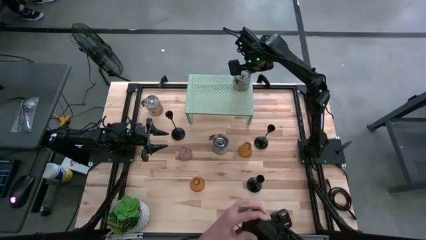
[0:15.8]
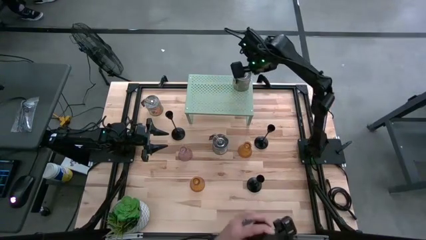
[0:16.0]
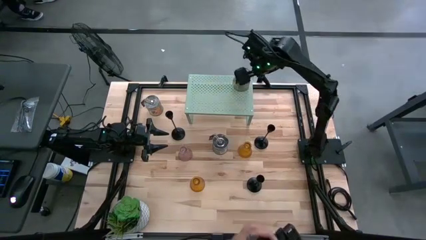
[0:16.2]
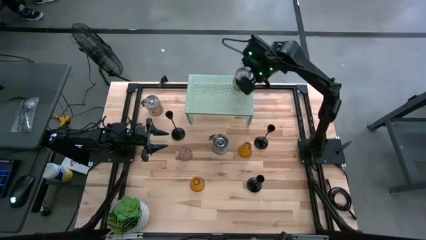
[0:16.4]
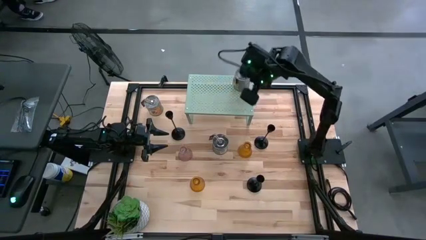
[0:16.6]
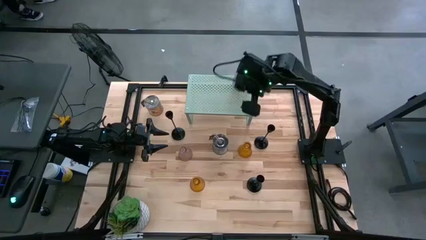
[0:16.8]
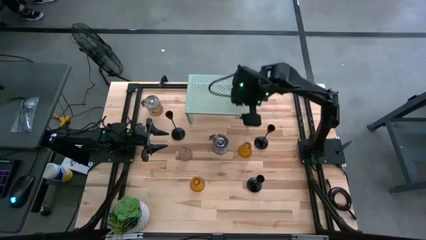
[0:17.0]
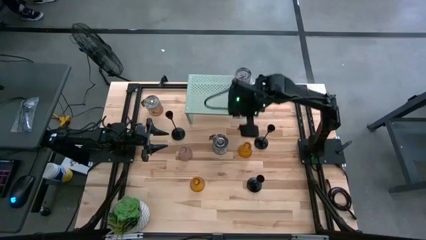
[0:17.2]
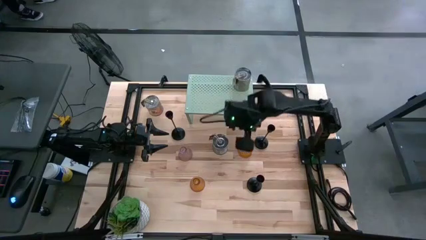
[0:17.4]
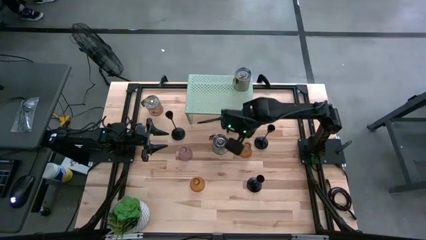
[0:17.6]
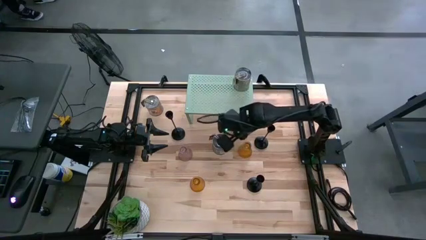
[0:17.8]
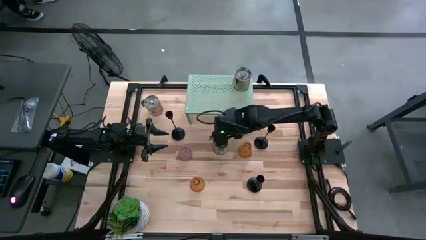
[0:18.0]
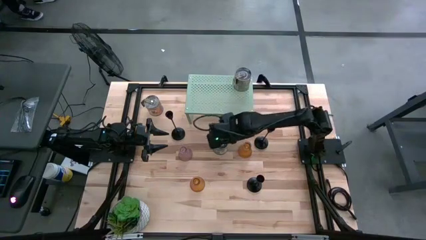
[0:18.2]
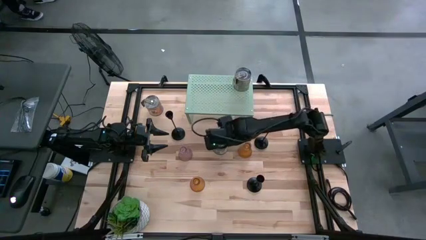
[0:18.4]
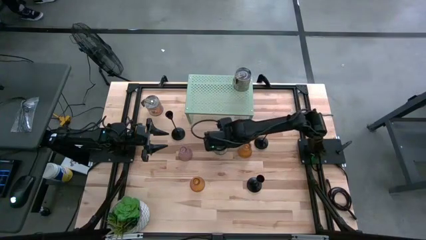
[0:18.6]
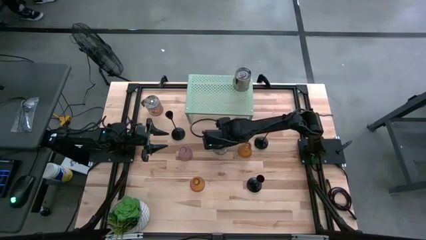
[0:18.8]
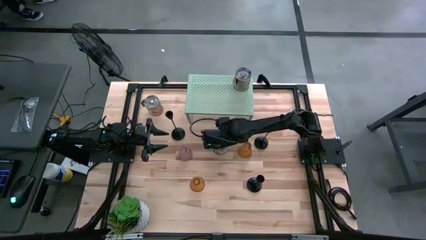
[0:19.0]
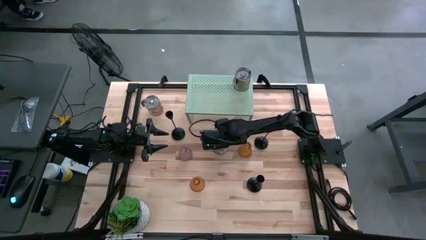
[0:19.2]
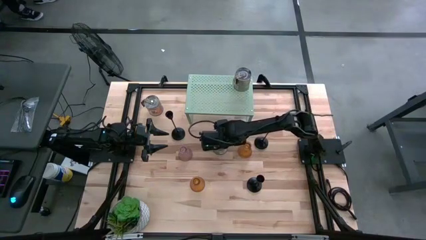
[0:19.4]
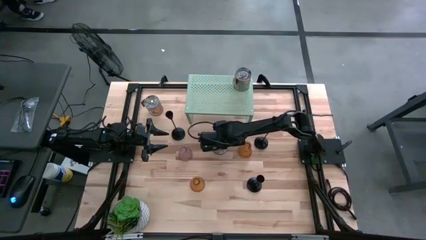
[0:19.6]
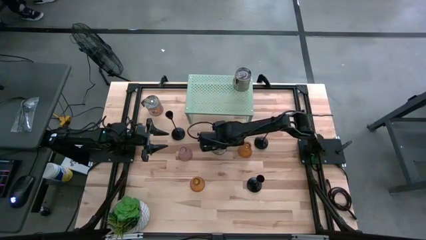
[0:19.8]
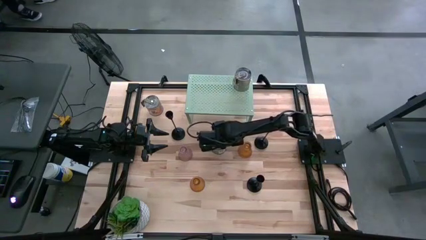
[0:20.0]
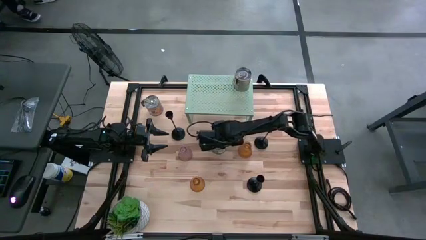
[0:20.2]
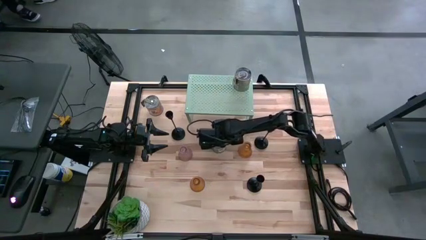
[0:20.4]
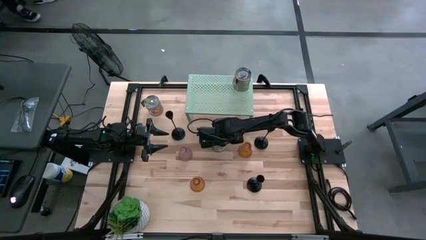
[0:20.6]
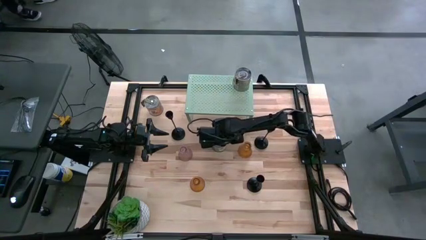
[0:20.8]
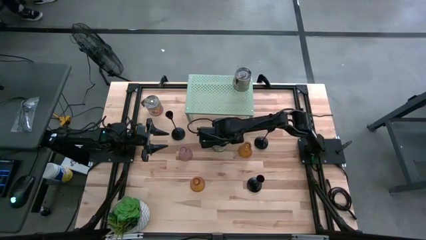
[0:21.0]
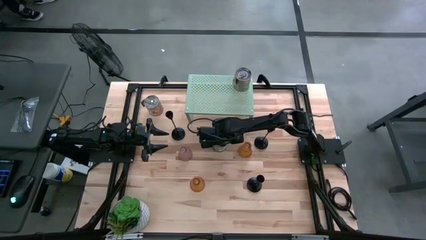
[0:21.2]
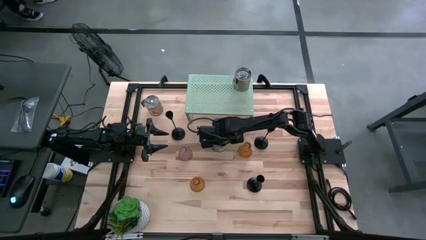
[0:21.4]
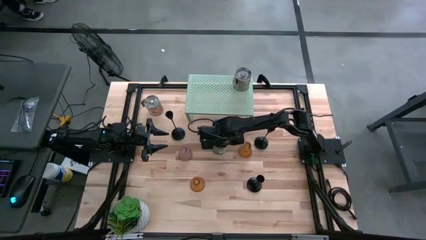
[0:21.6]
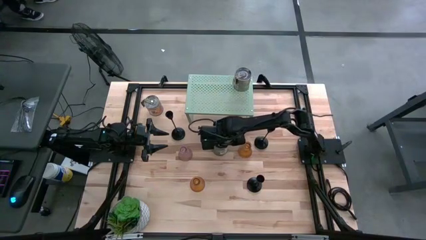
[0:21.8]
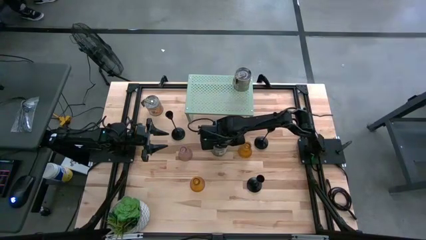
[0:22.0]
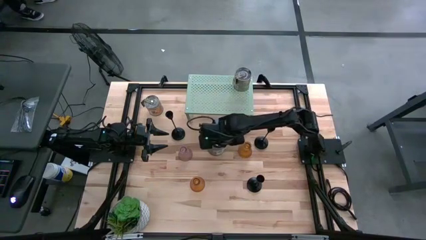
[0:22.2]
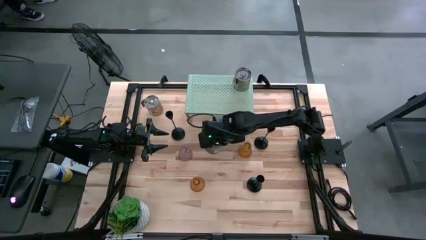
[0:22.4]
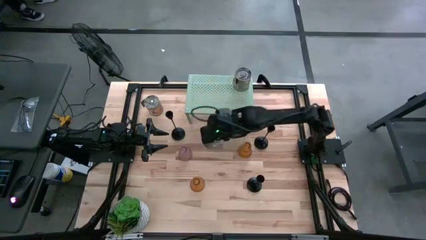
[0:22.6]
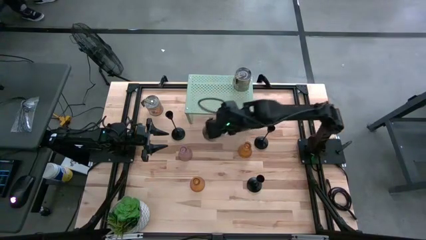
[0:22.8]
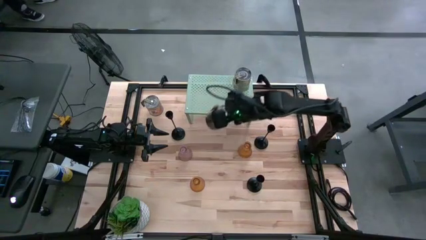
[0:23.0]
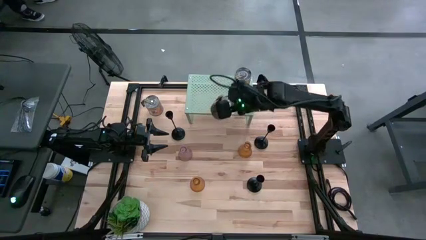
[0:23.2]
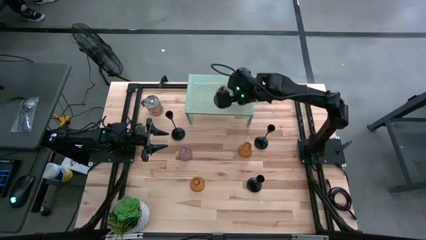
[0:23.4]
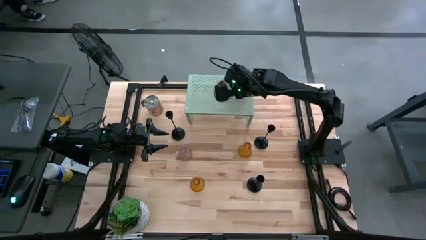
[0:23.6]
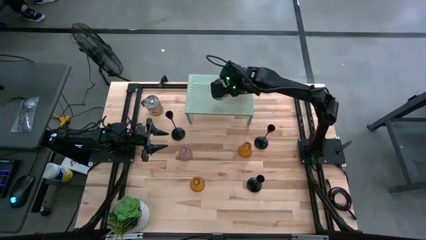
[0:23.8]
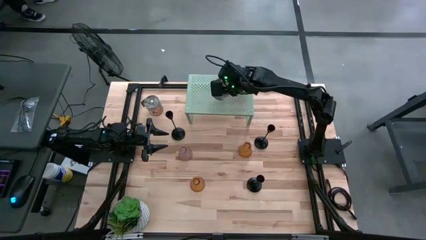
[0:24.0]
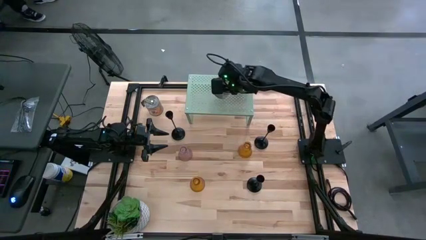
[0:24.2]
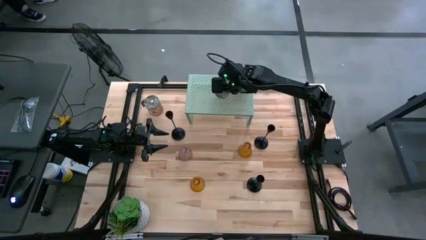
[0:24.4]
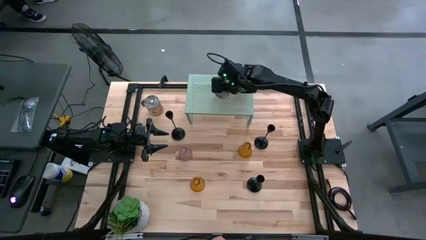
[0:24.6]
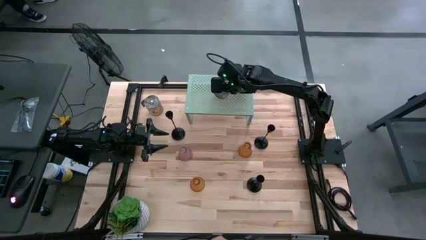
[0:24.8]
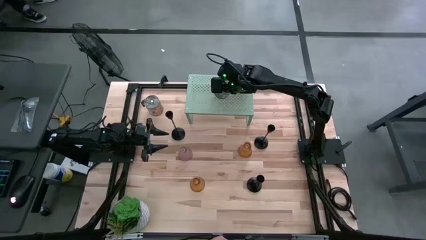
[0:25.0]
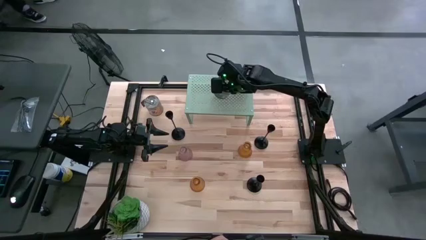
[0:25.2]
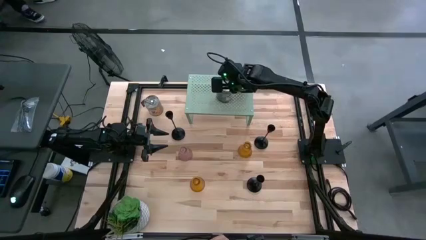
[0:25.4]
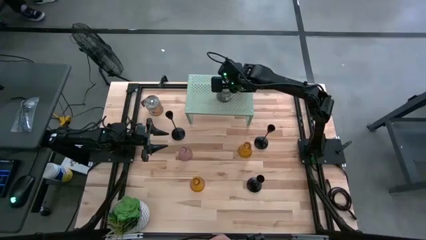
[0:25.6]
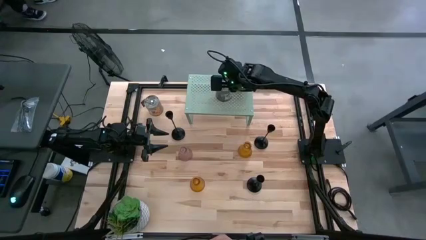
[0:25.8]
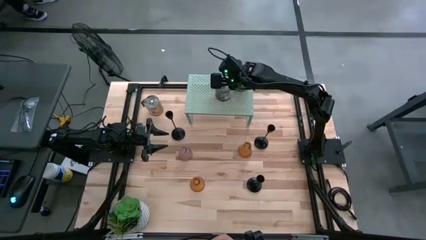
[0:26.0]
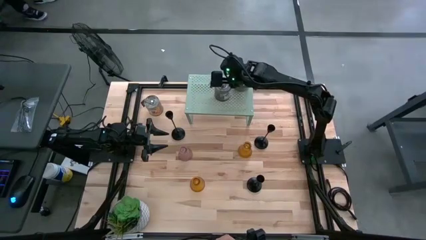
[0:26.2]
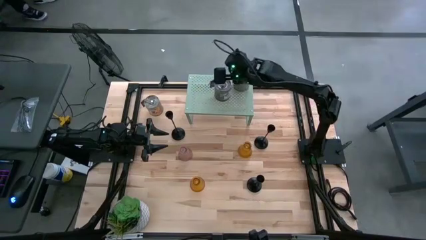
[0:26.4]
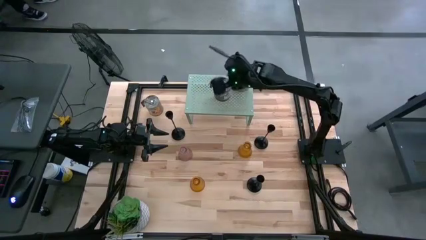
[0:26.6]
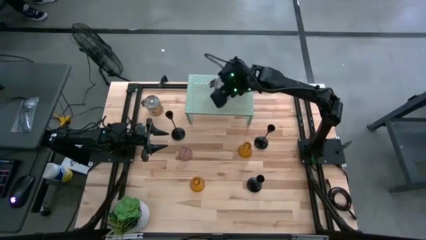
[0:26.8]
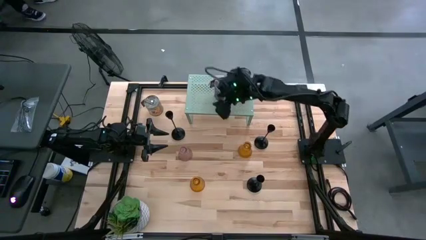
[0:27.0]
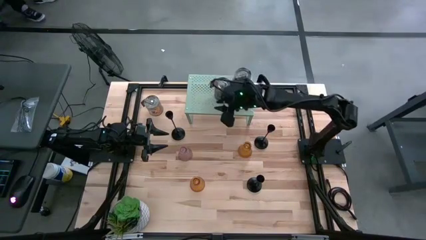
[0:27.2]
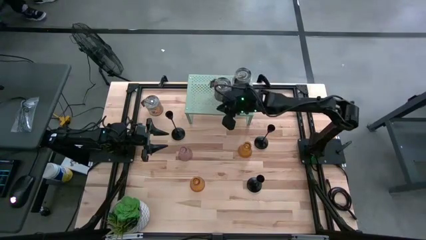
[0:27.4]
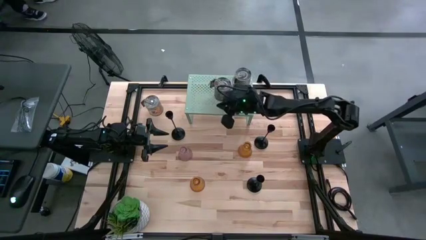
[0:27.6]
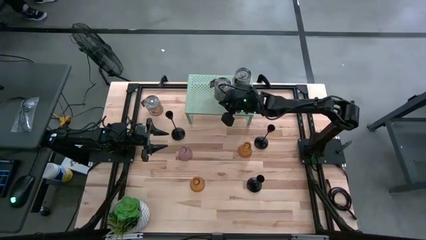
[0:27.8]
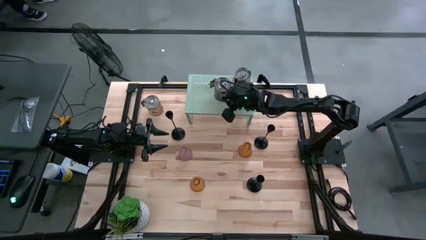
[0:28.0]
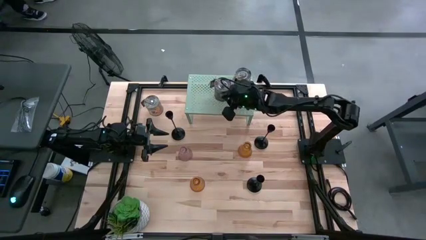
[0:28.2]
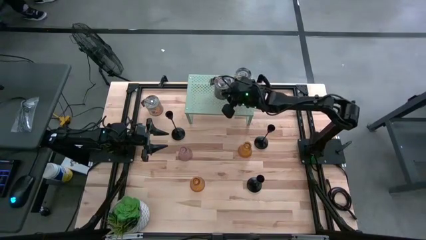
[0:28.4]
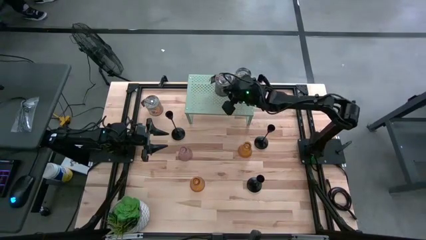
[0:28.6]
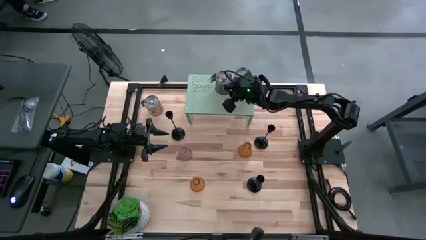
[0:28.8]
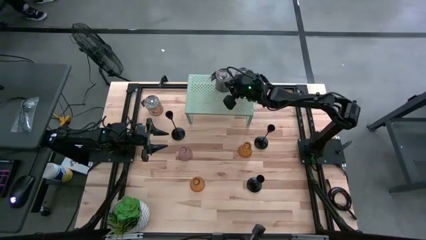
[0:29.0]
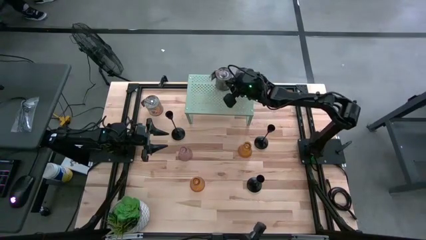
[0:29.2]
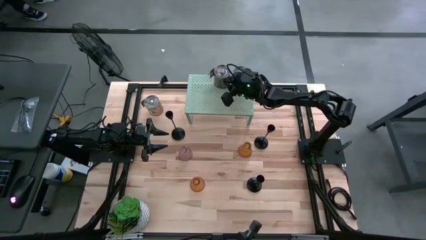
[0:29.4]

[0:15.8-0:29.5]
Task: Pick & Place candle stick holders
Put the right scented candle on the shelf
